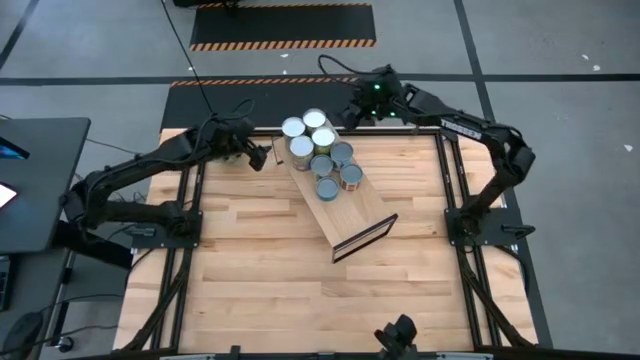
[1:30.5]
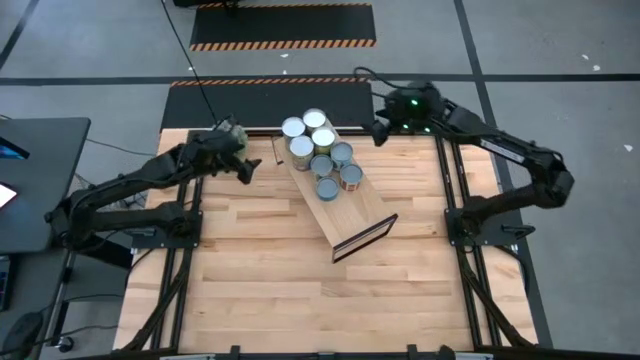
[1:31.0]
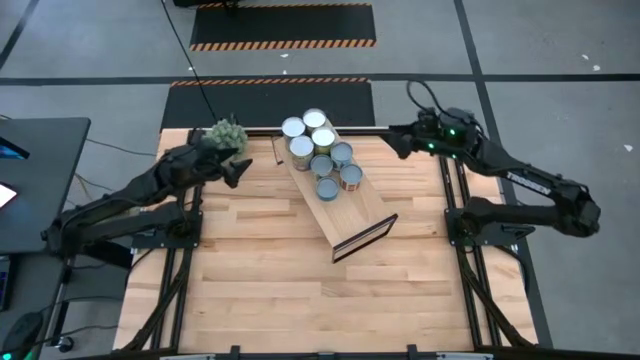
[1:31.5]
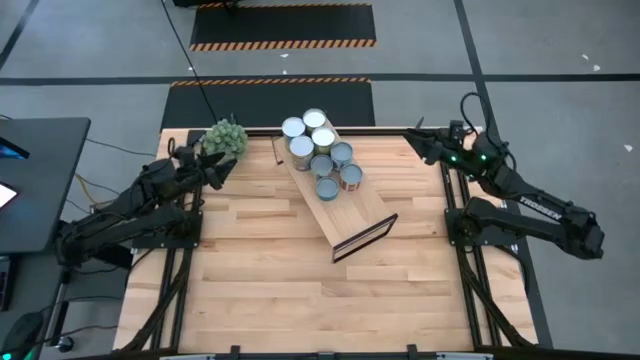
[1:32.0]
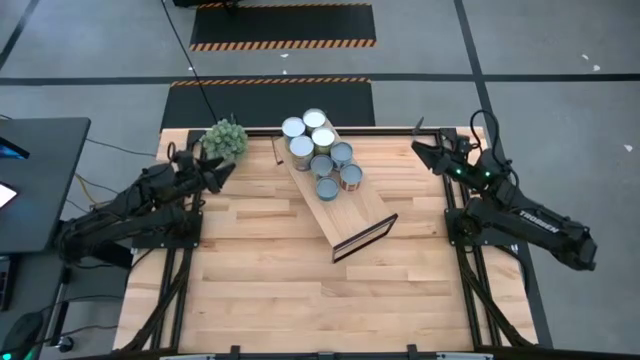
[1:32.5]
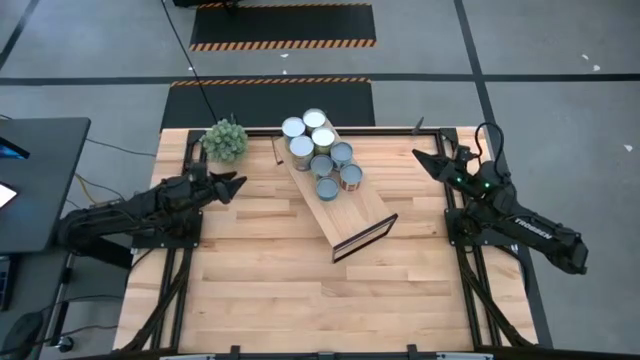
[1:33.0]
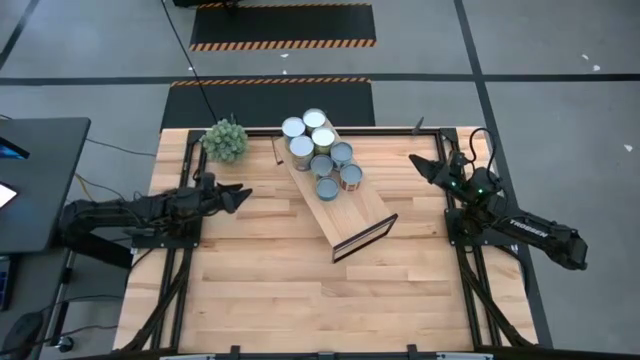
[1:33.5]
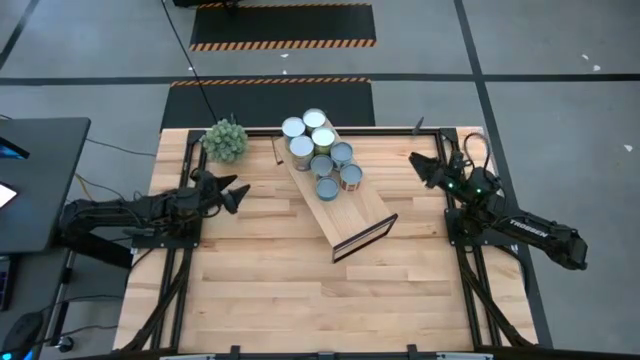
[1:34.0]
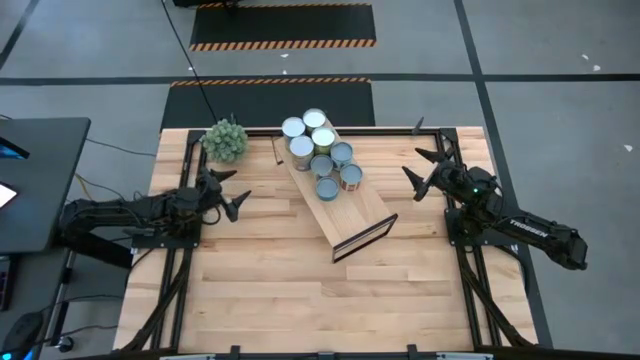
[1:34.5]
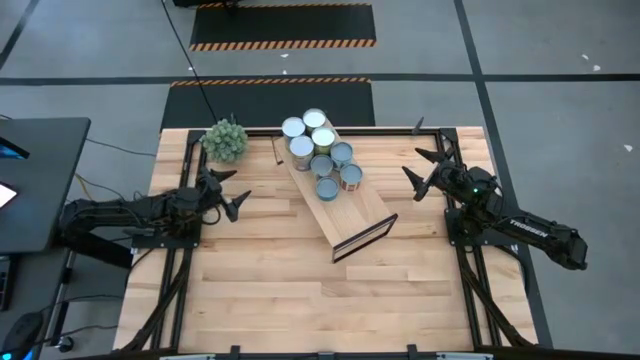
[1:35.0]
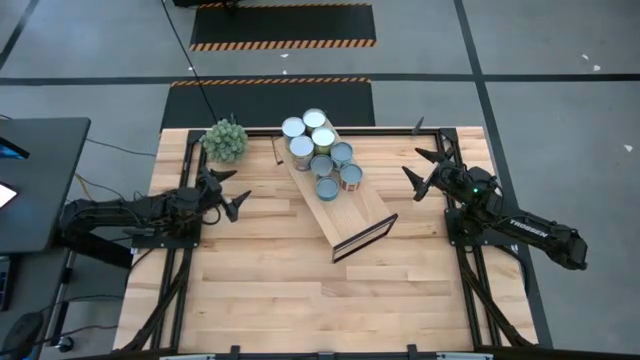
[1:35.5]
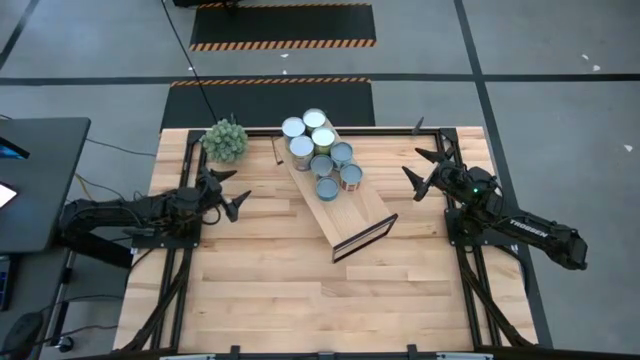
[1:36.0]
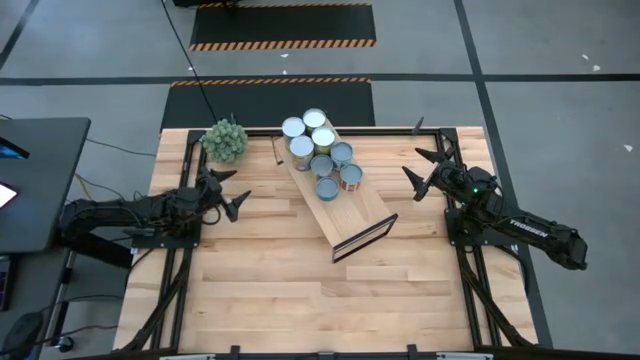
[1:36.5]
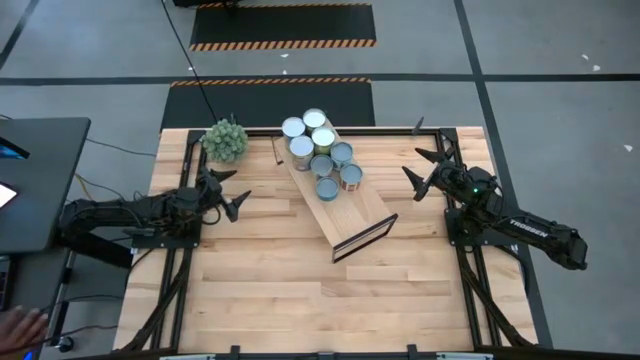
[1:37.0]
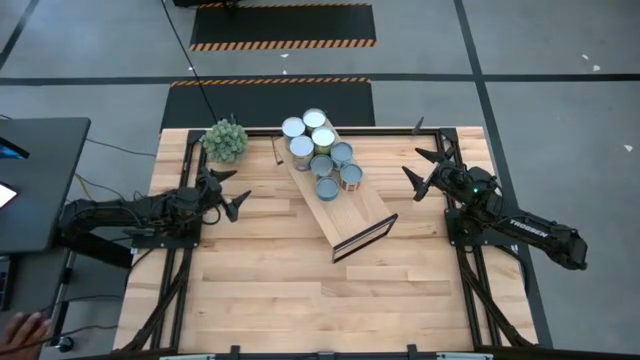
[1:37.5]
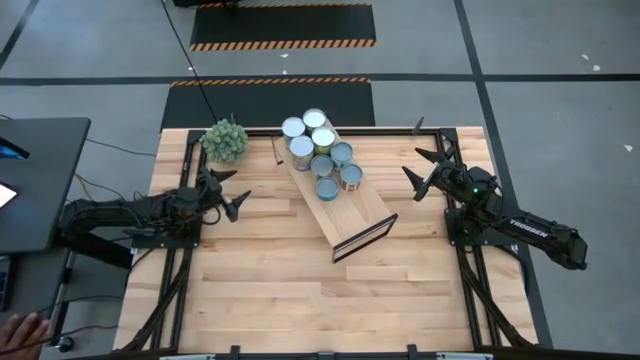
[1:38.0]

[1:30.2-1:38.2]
Task: Pick and place cans onto a shelf
Return to Home Position

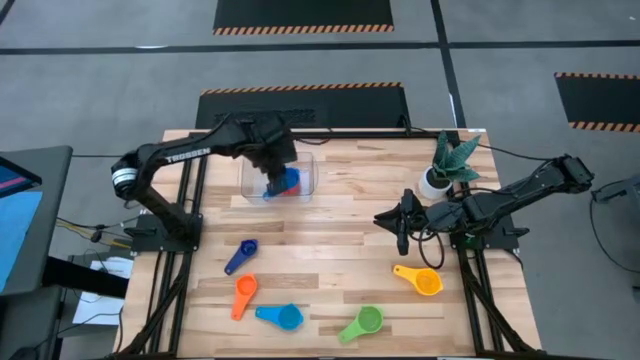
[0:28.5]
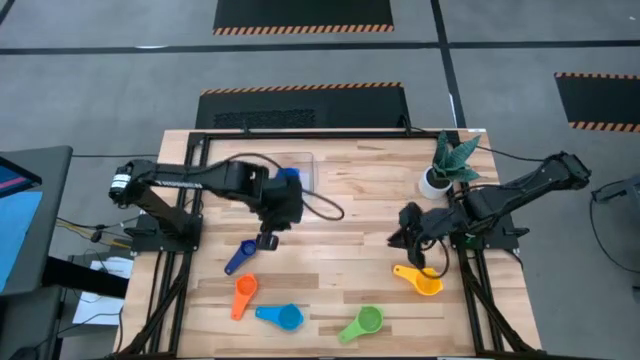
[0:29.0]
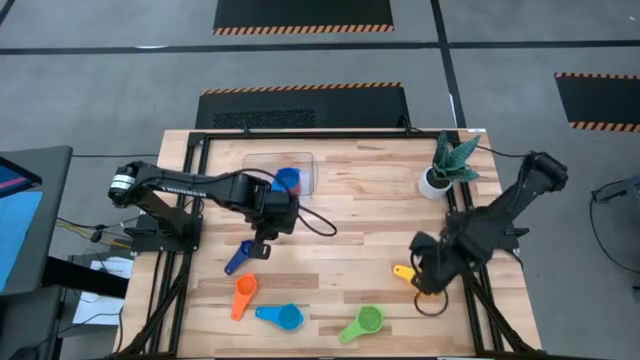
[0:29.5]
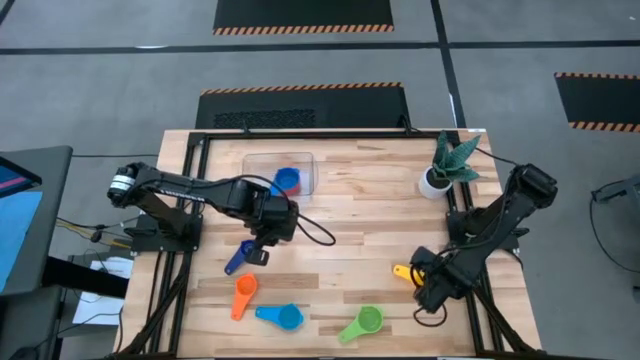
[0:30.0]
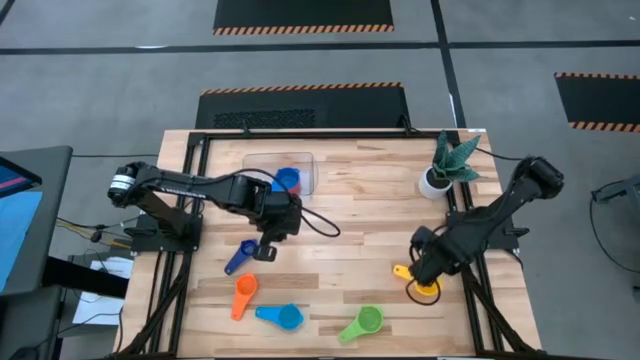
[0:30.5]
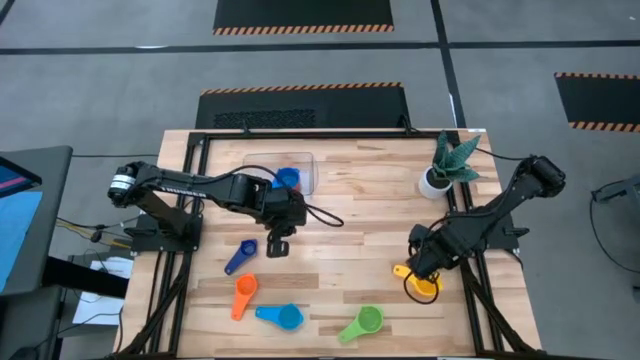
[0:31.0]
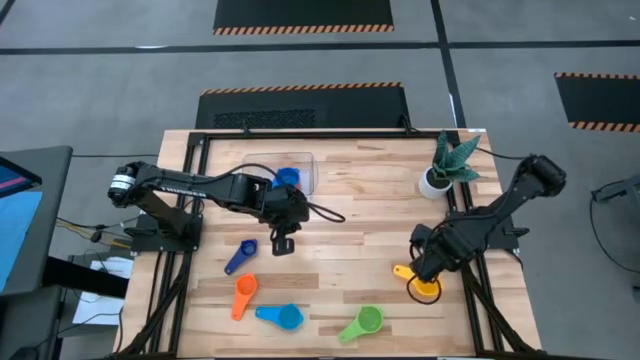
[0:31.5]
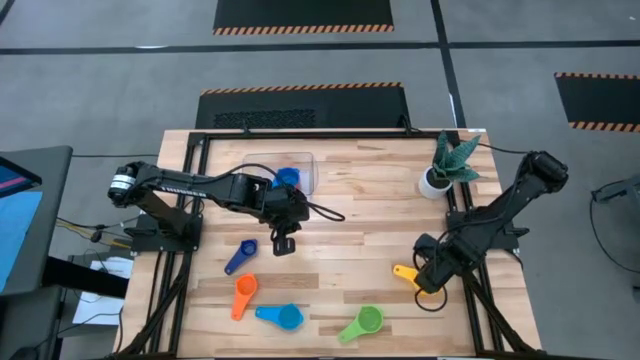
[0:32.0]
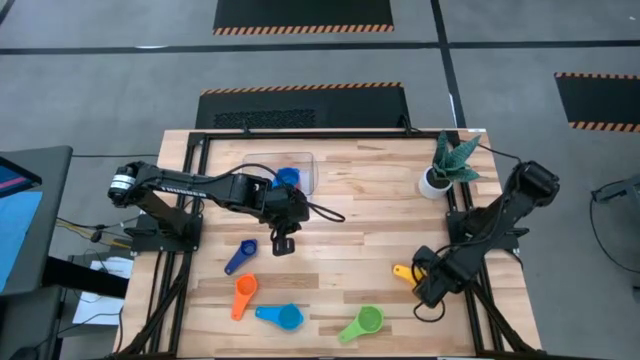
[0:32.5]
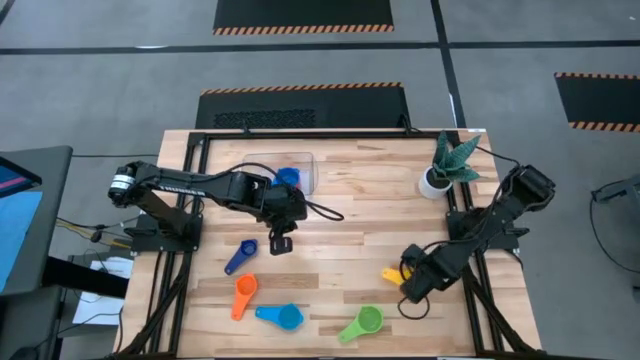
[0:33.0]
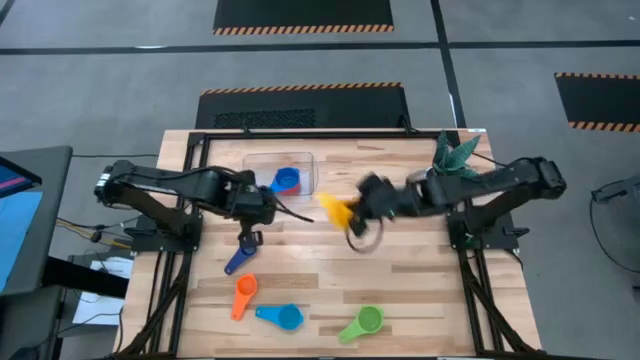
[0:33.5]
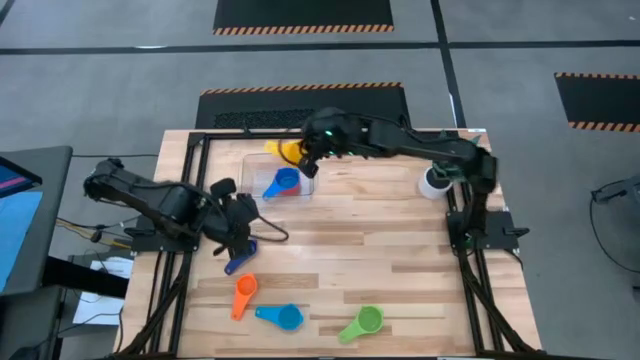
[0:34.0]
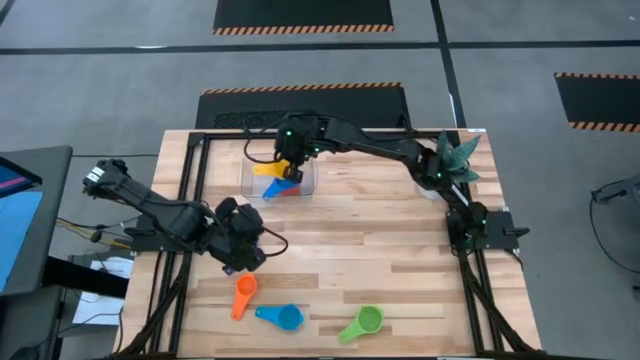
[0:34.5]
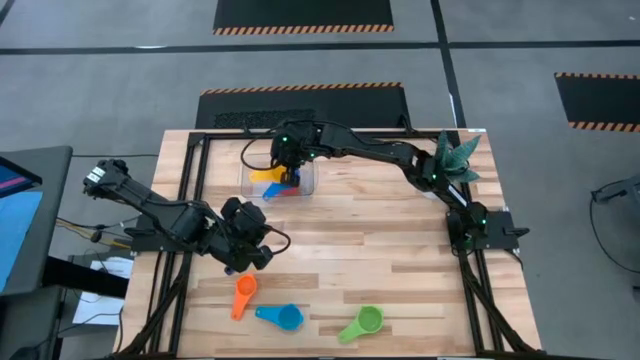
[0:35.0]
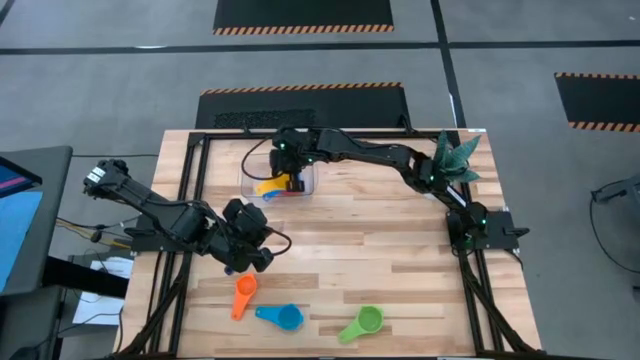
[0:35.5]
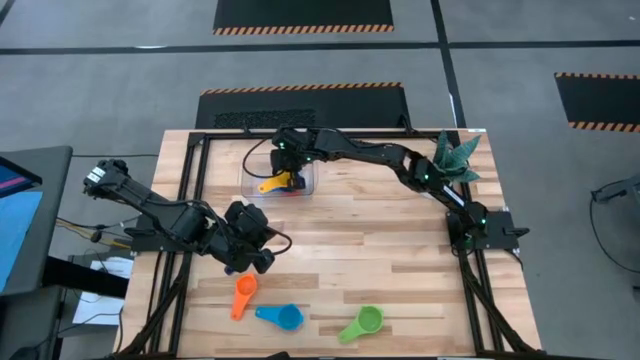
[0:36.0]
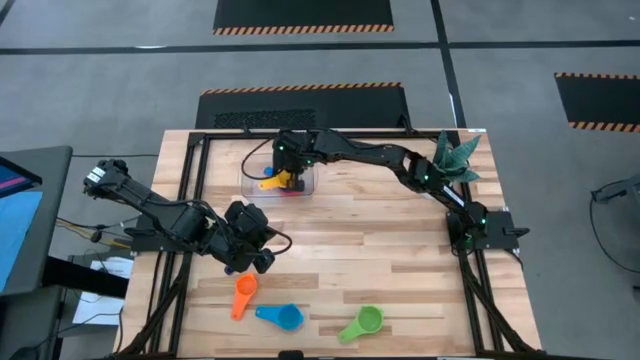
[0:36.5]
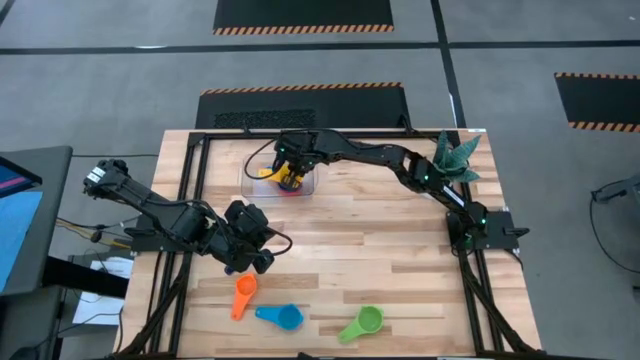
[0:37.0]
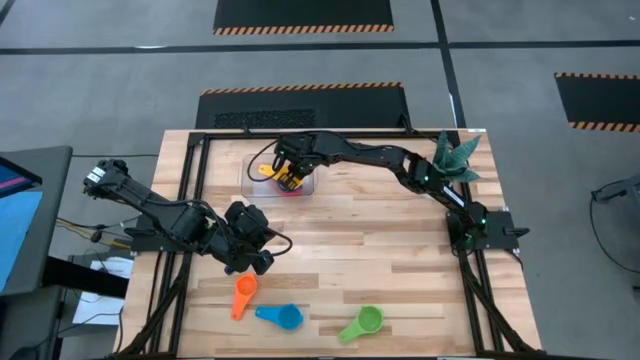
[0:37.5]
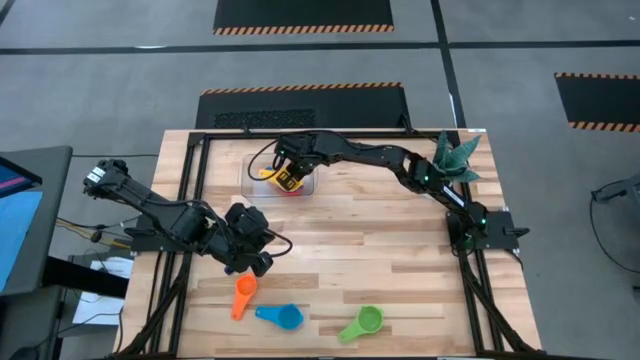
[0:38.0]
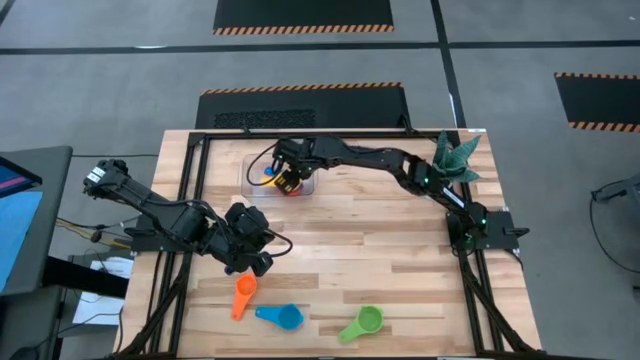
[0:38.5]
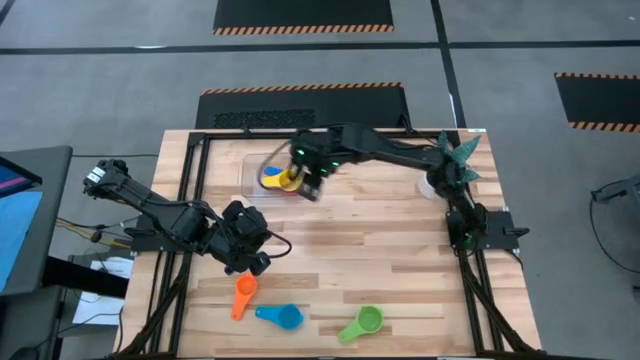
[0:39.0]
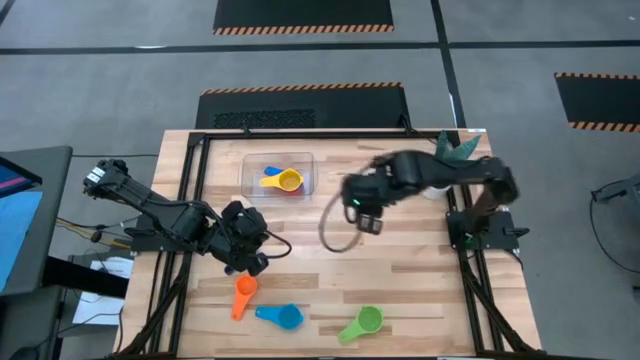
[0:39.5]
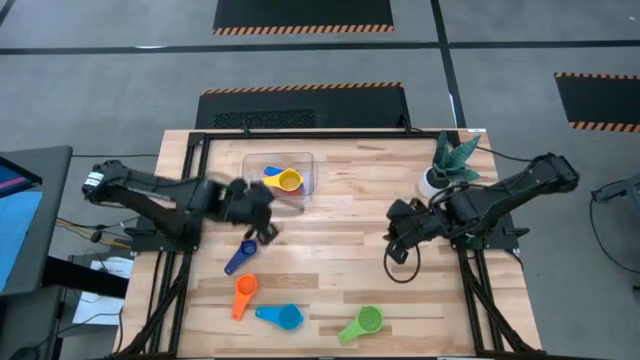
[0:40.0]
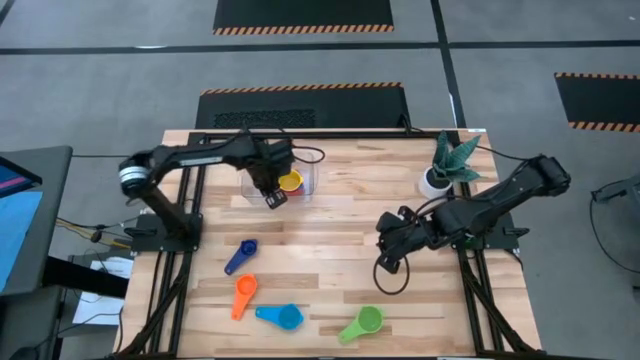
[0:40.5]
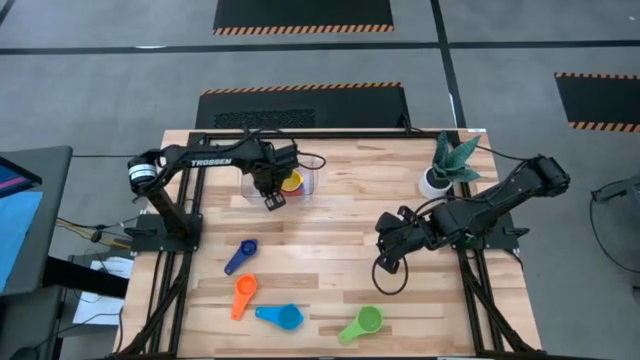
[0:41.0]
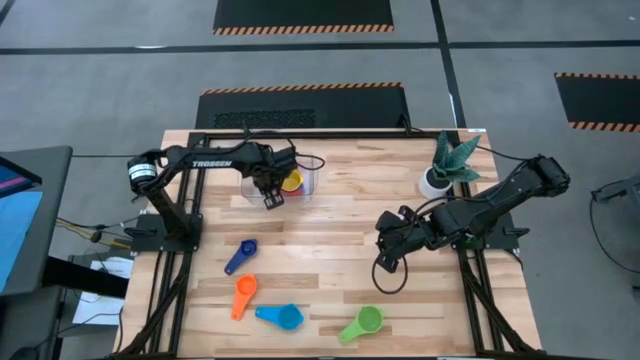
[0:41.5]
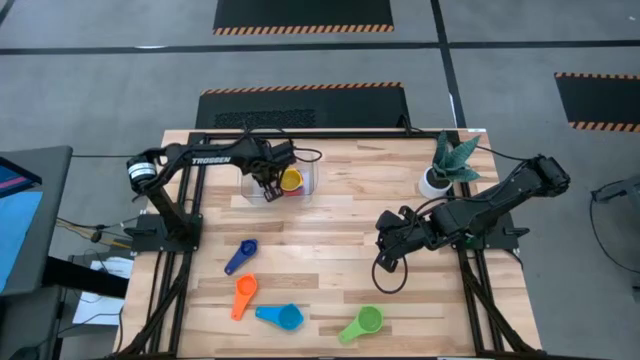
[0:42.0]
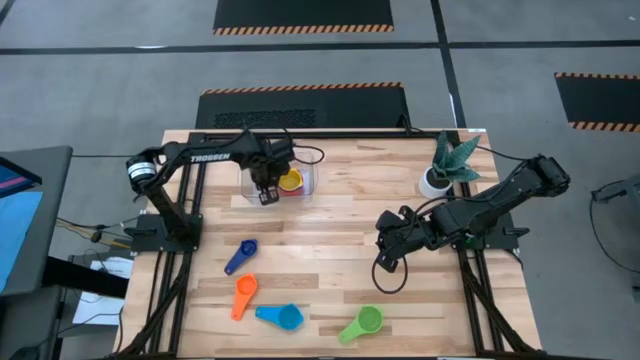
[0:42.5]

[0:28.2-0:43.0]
Task: Nest measuring cups in basket
Stack the yellow measuring cup into the dark blue measuring cup in the transparent bin
